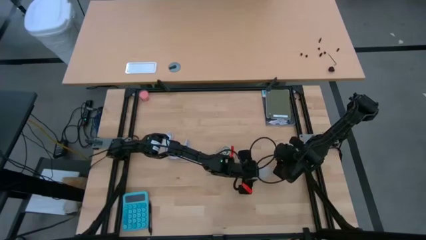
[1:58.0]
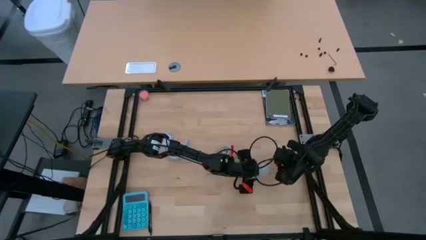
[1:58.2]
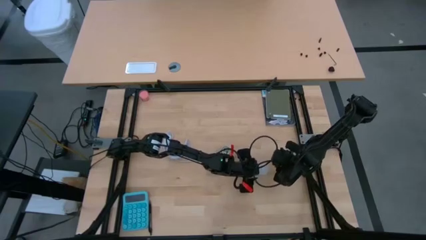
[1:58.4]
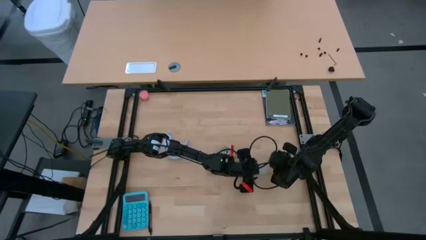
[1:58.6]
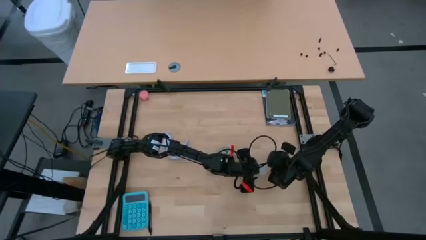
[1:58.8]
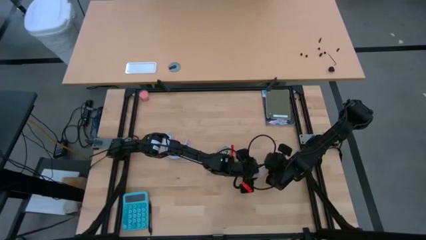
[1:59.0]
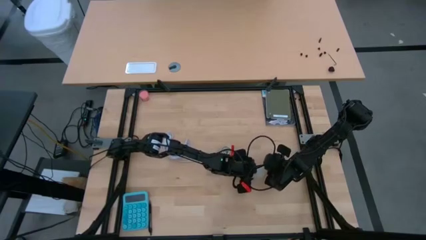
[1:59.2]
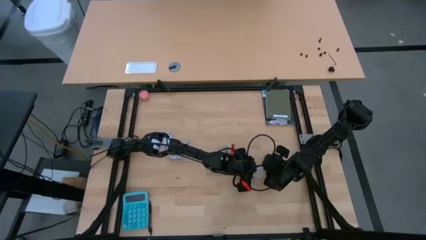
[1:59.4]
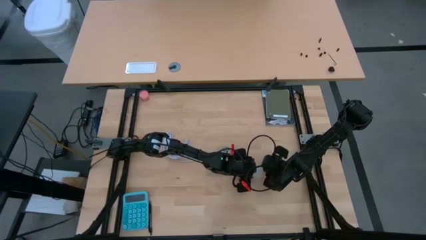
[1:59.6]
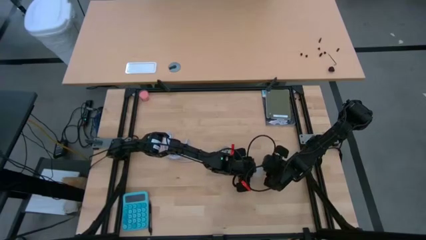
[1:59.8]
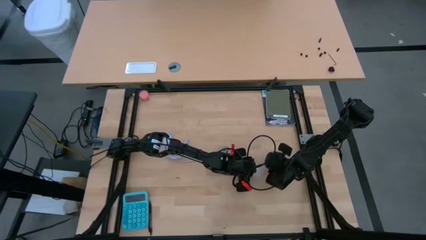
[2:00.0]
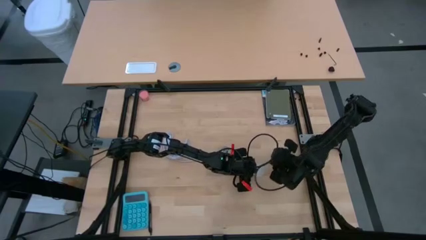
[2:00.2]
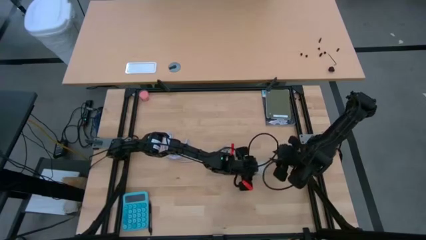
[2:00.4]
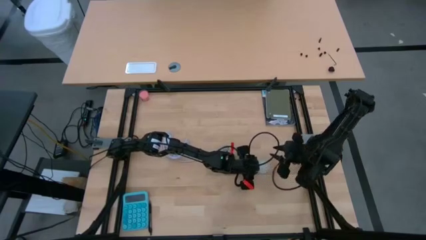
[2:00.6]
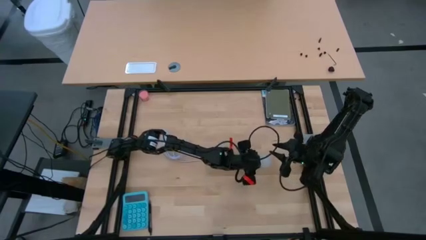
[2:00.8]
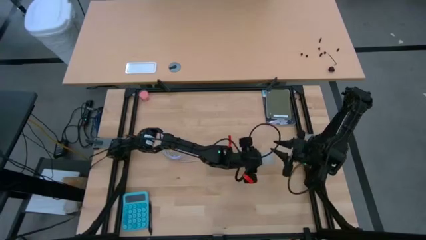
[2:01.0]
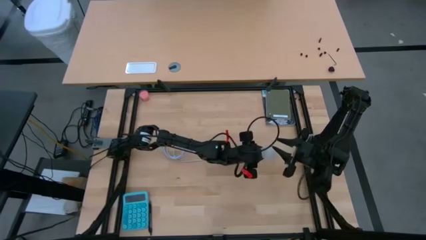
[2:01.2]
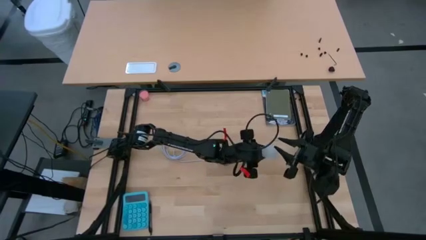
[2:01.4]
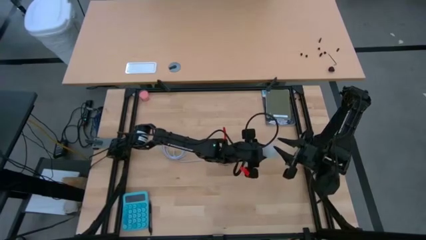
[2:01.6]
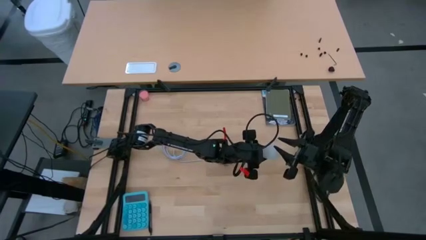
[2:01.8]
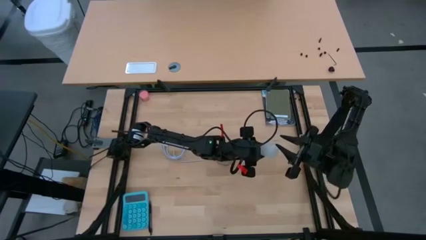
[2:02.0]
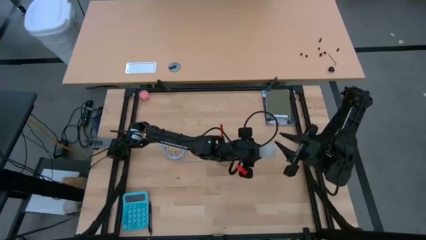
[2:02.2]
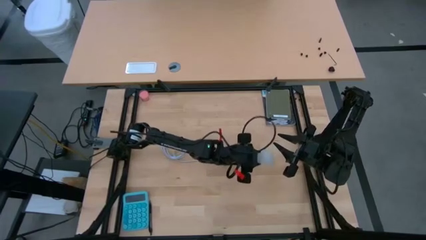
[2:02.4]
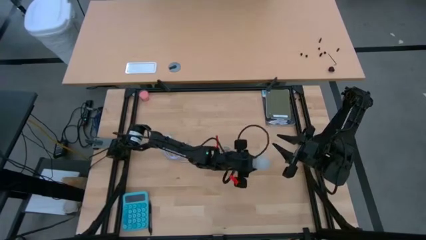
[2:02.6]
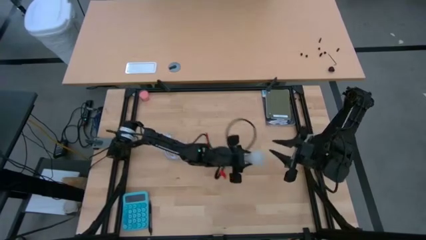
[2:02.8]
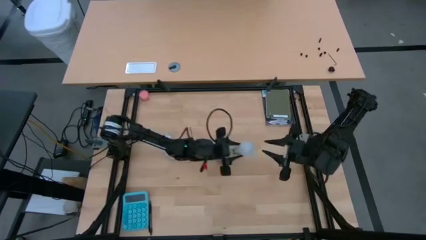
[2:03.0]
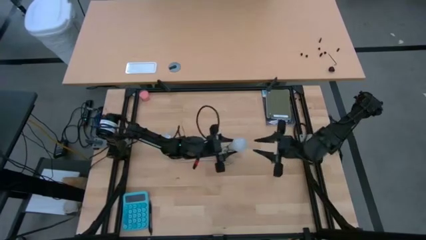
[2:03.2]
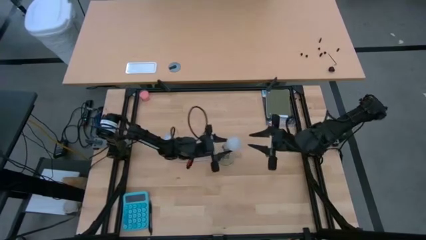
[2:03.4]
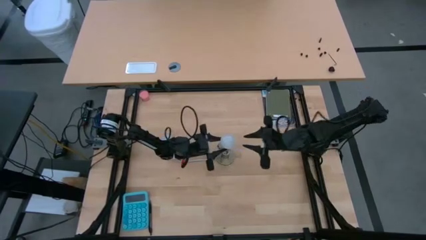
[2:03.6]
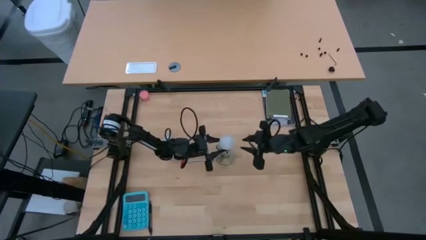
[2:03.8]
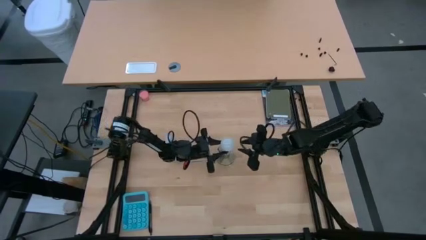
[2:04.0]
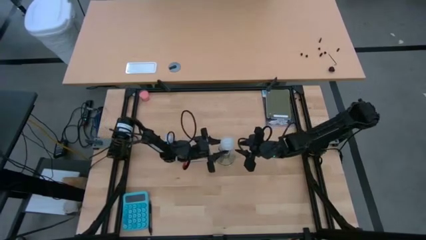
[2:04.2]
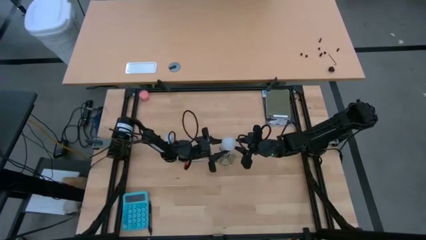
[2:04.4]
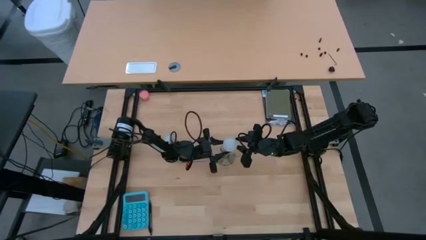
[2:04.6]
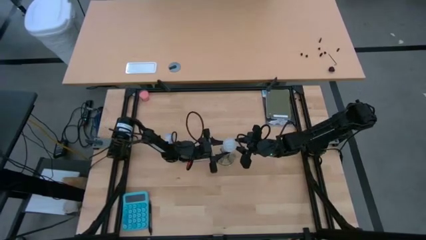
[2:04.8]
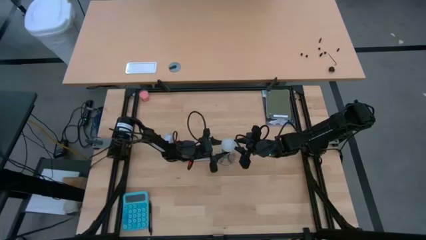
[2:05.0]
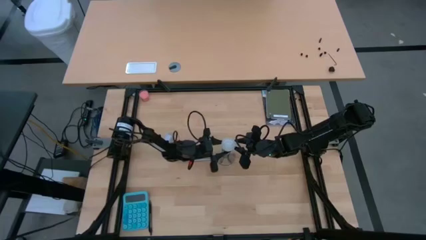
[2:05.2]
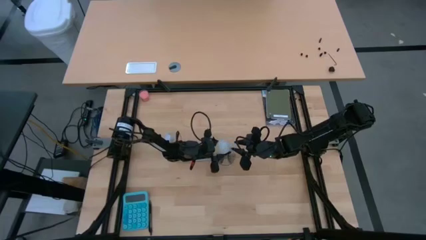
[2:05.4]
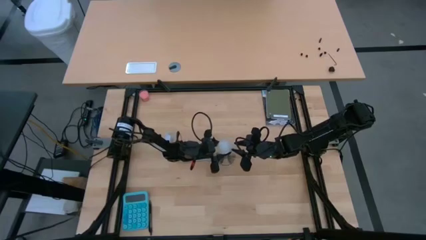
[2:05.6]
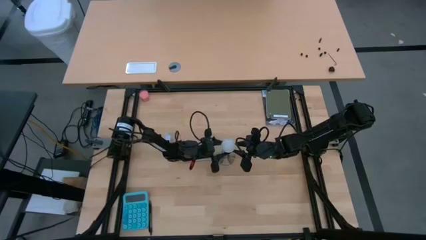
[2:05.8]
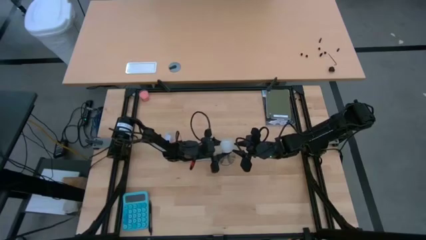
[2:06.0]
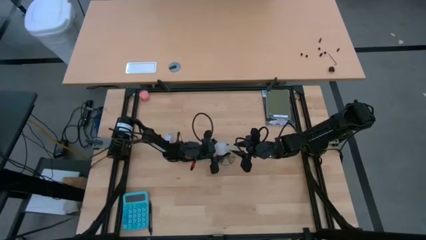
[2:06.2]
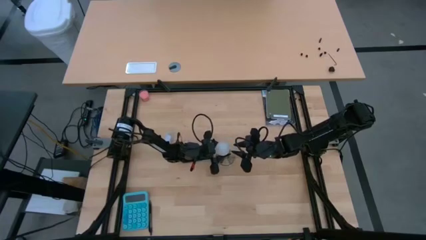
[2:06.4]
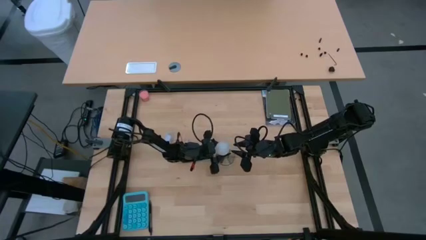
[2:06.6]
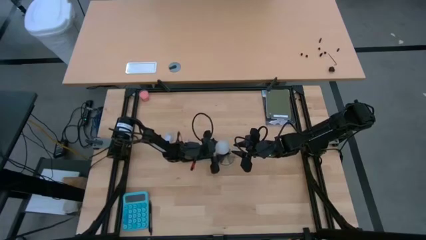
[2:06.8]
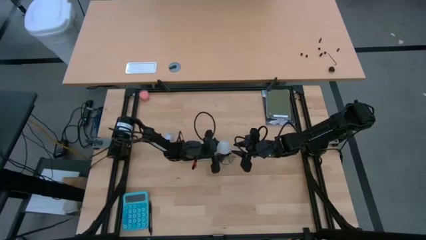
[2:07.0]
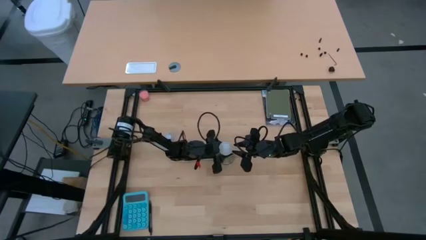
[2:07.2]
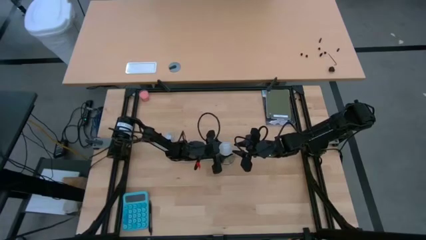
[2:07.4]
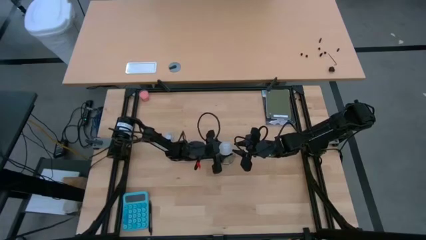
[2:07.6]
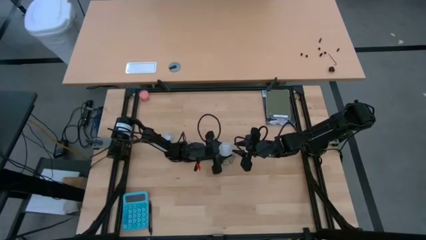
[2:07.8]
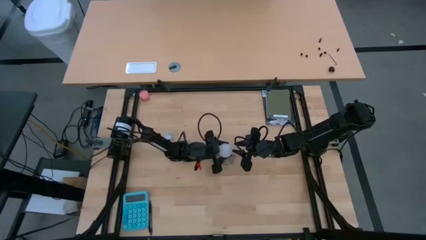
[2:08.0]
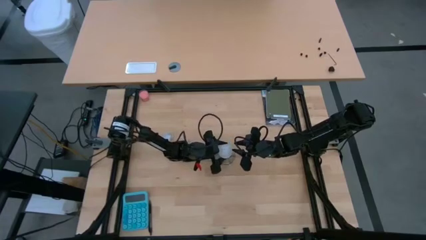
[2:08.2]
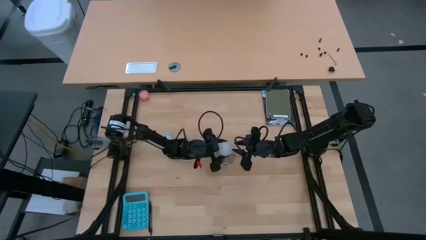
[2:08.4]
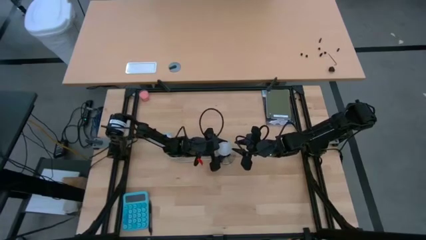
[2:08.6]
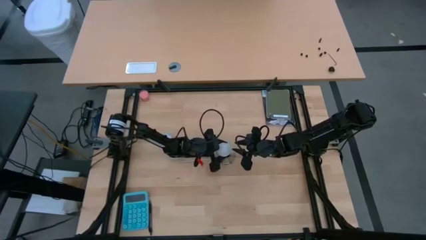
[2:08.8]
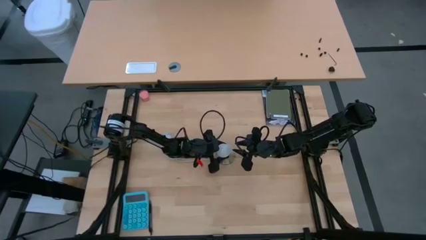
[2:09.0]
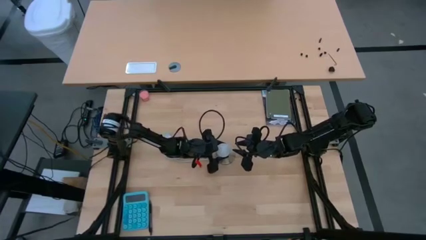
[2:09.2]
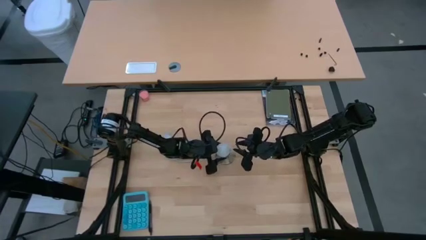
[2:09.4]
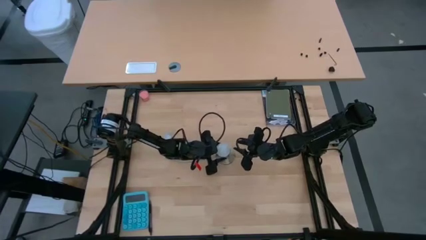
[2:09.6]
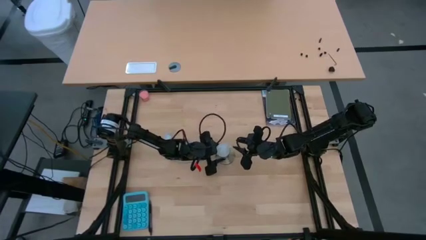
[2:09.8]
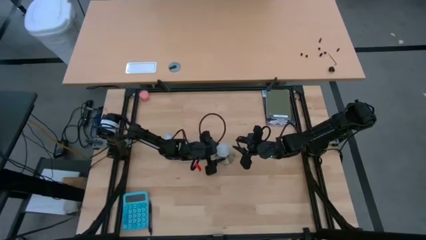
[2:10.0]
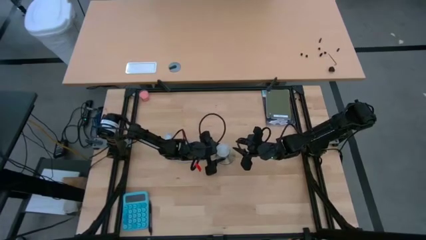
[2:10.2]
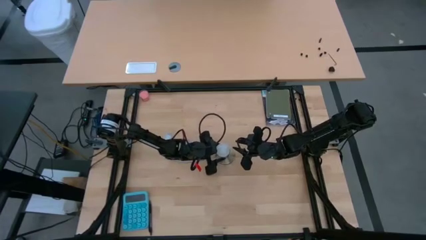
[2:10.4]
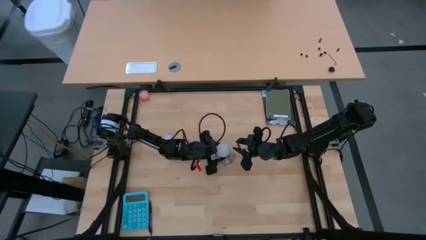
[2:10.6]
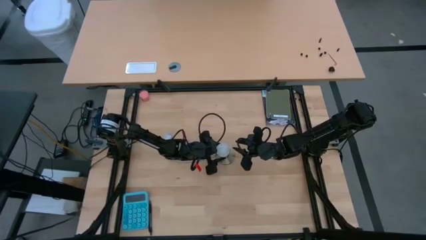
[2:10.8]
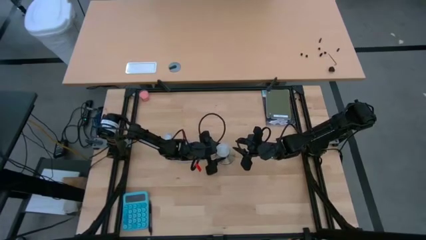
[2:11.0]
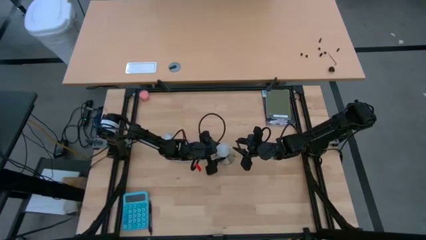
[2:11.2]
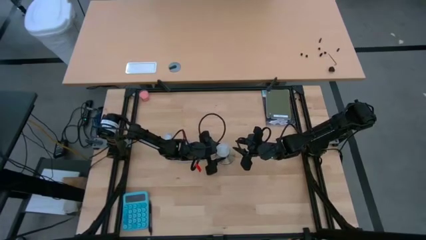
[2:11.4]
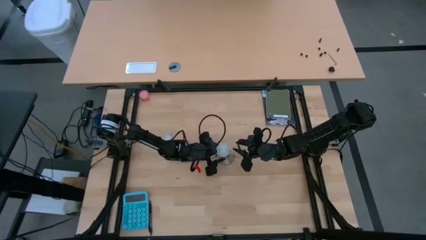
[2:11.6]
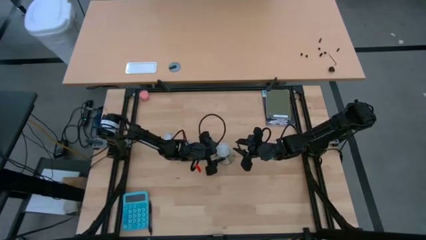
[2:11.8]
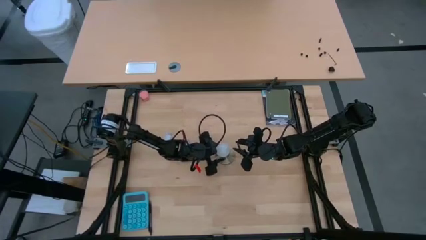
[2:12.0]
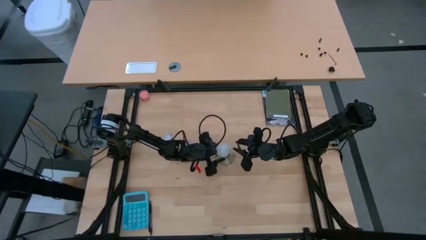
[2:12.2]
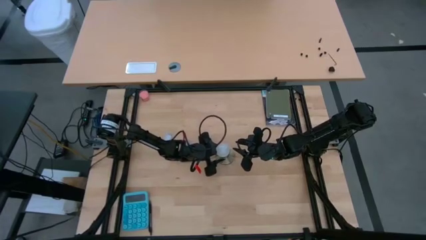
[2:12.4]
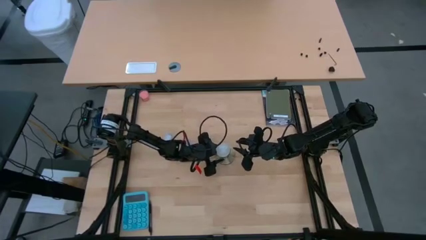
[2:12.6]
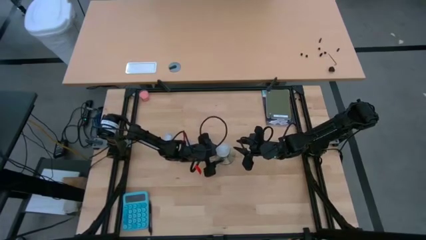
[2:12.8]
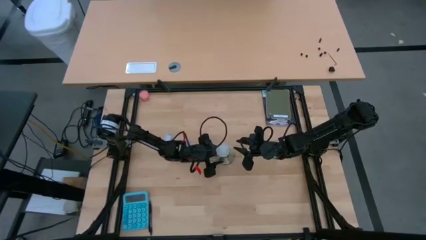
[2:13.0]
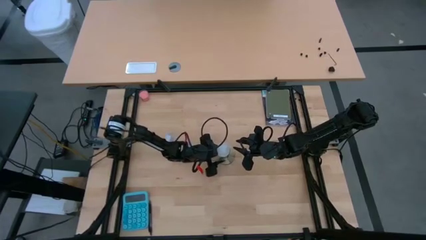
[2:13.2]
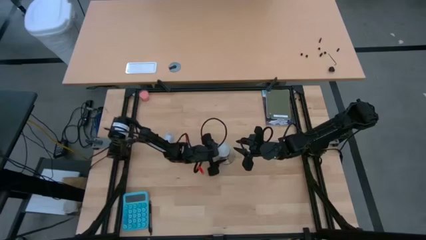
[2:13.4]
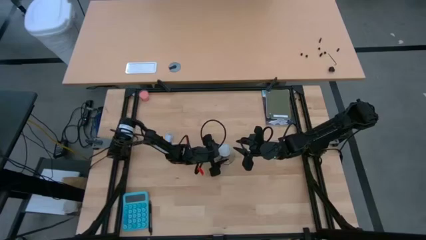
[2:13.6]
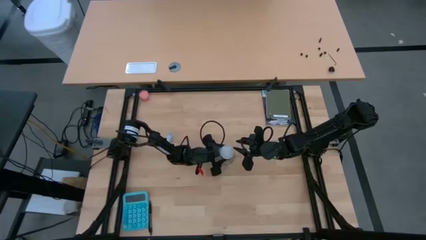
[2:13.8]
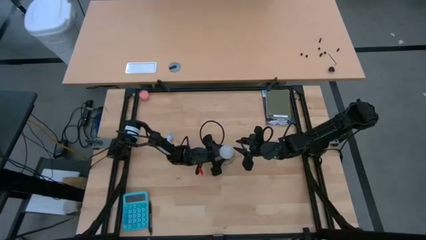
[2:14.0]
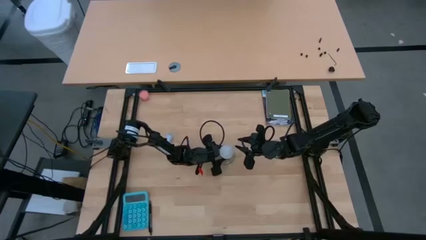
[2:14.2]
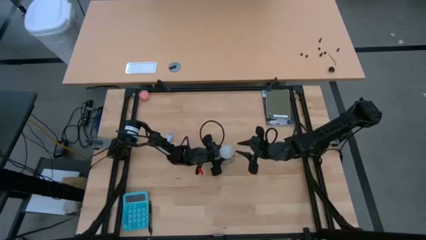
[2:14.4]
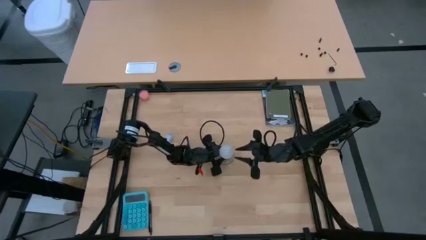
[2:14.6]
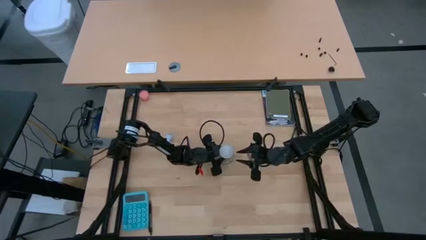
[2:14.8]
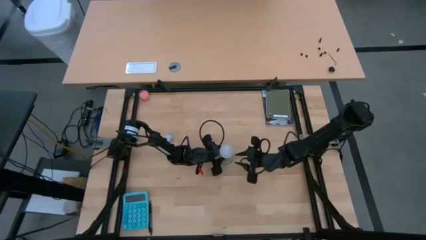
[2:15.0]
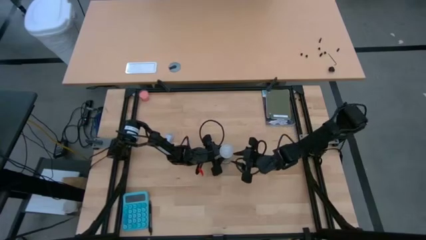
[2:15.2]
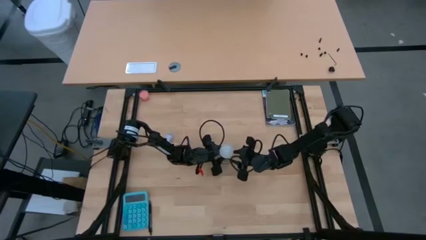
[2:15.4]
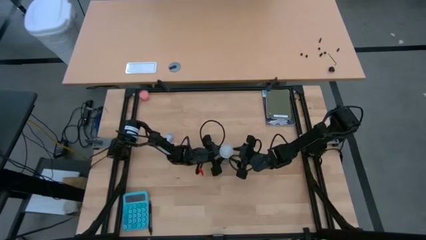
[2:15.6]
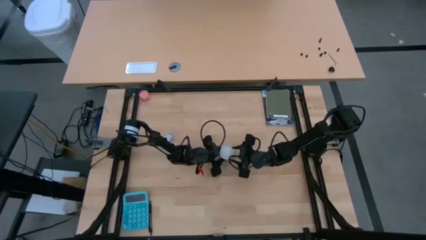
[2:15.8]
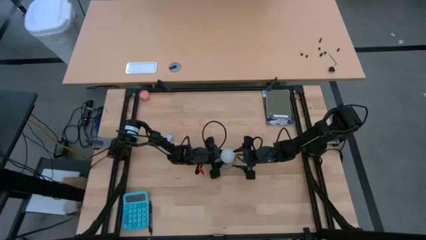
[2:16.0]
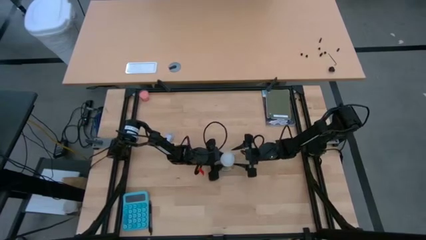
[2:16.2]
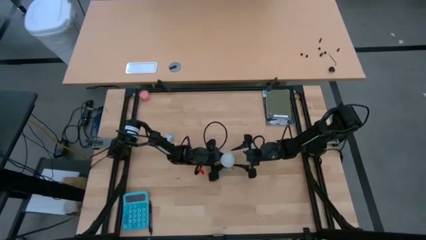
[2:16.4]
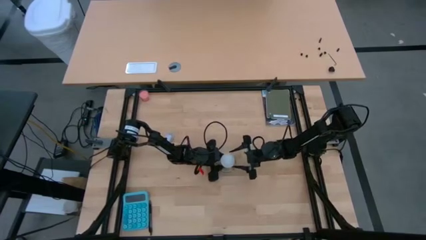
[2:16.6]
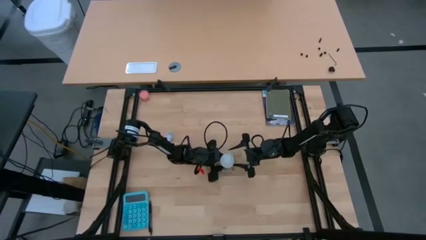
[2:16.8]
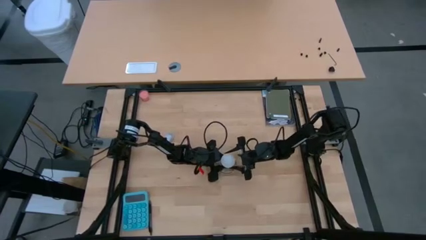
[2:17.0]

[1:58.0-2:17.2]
Task: Screw lightbulb
Insert the lightbulb into the lamp holder
